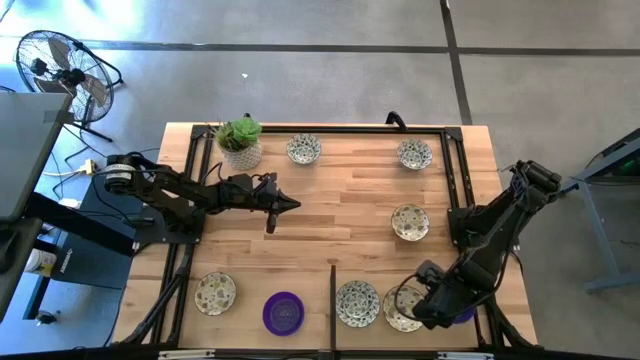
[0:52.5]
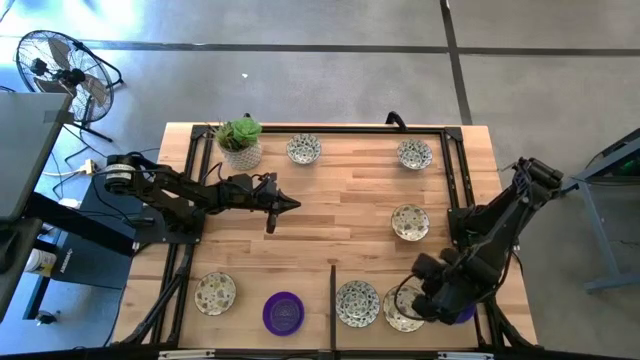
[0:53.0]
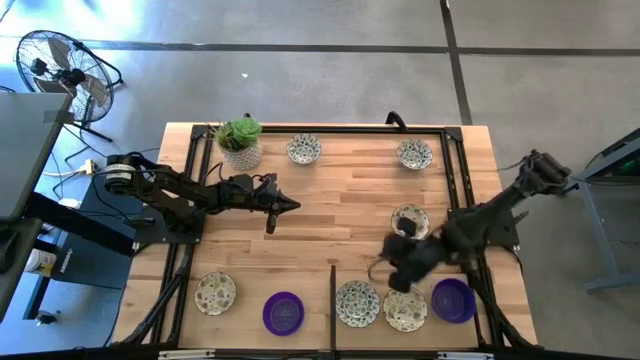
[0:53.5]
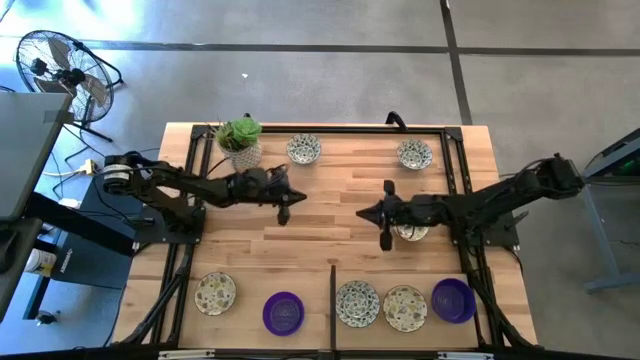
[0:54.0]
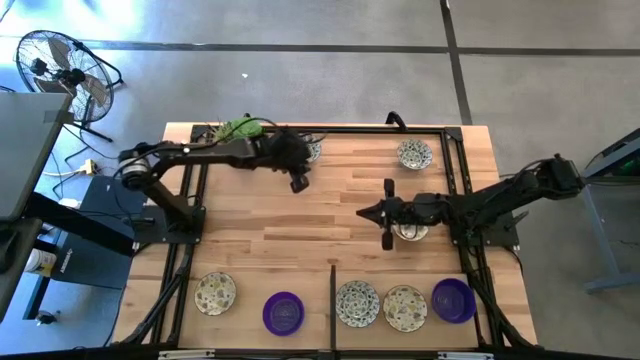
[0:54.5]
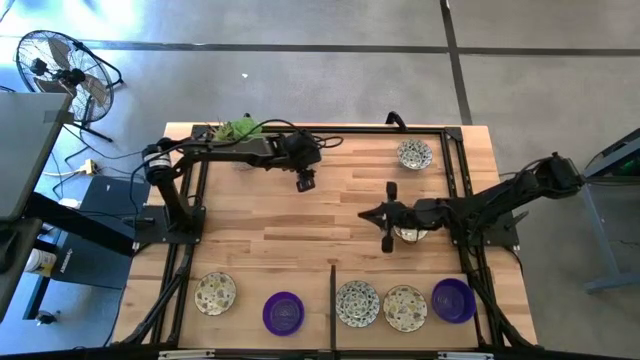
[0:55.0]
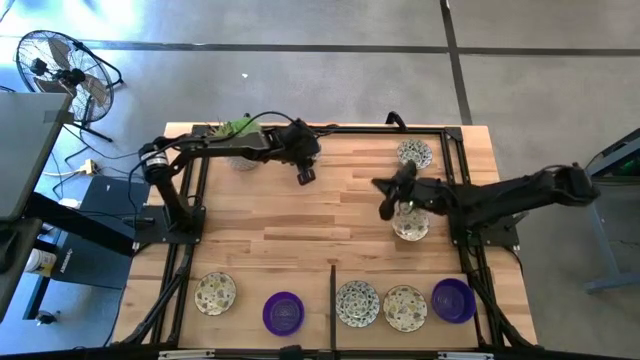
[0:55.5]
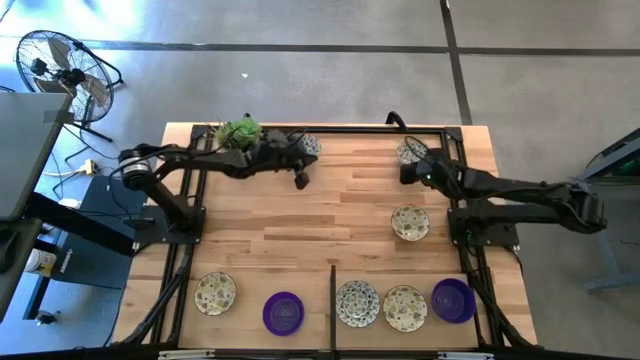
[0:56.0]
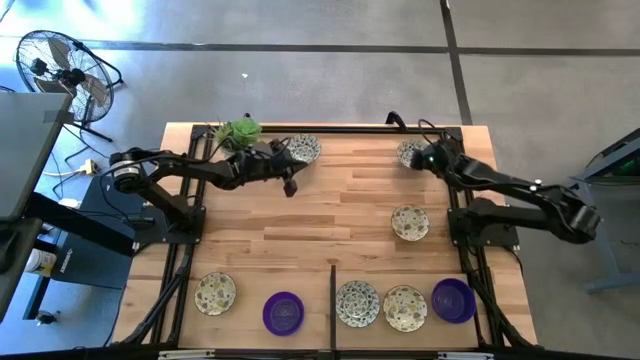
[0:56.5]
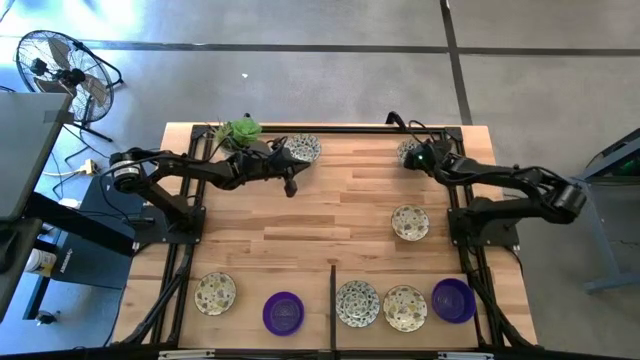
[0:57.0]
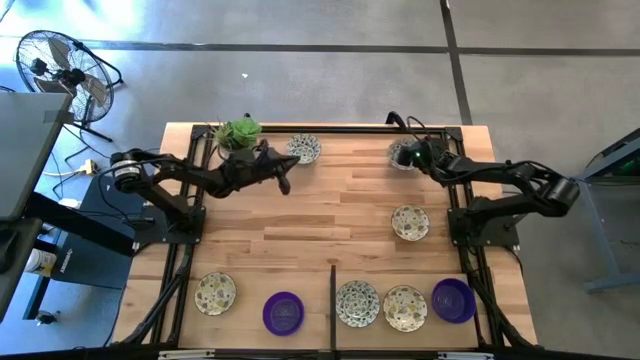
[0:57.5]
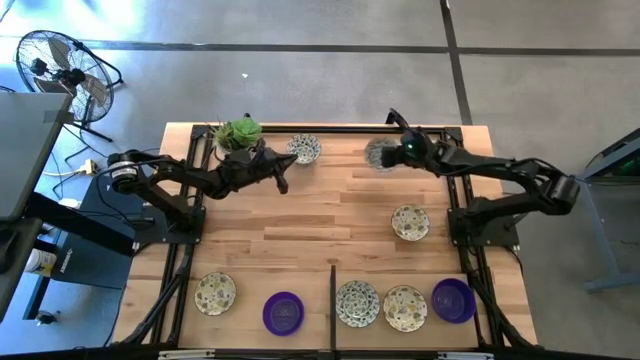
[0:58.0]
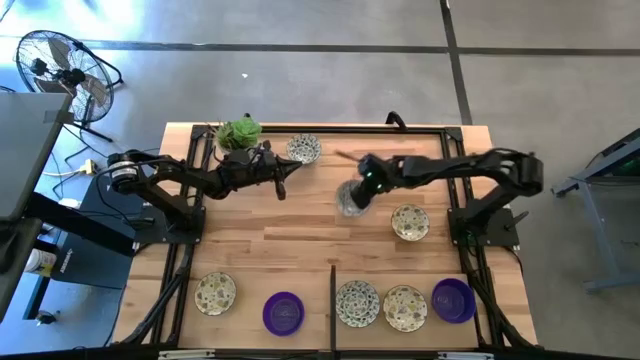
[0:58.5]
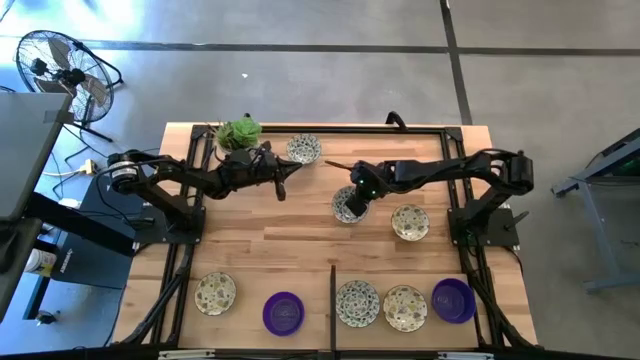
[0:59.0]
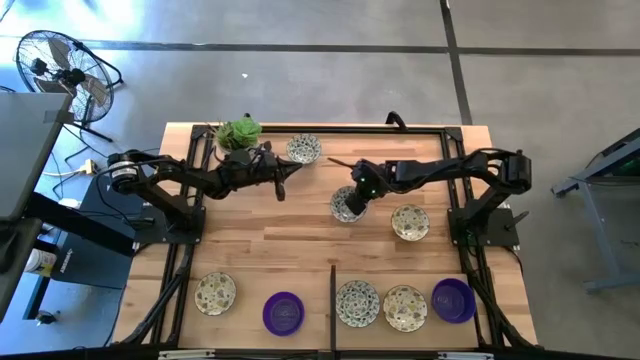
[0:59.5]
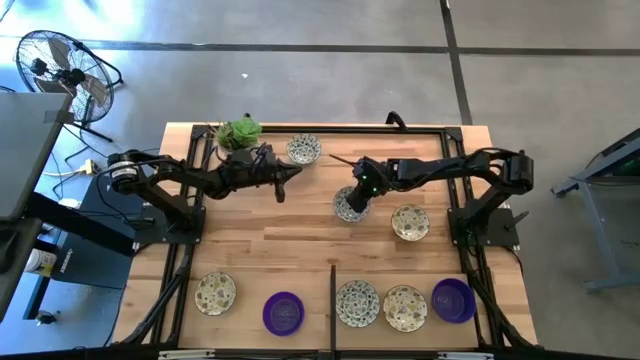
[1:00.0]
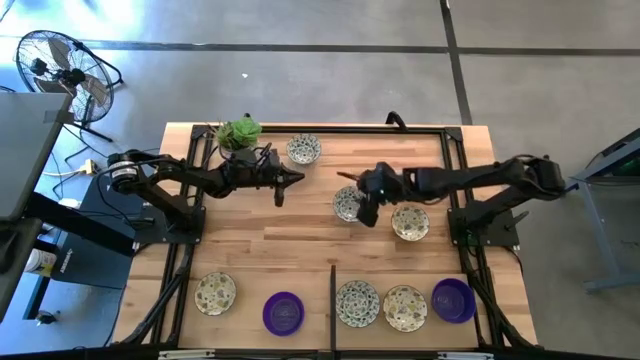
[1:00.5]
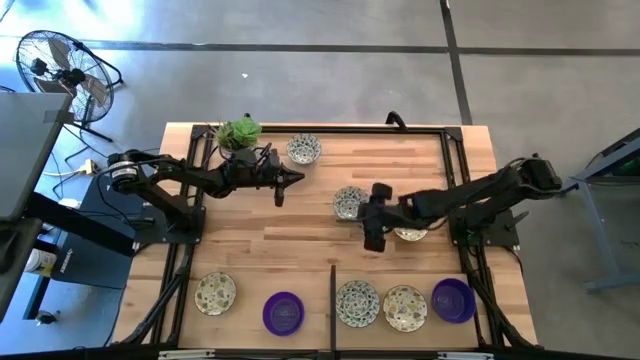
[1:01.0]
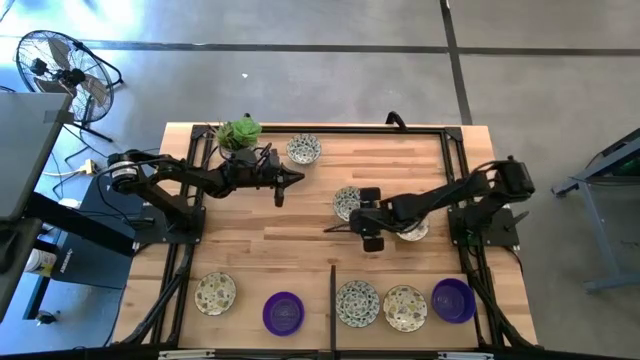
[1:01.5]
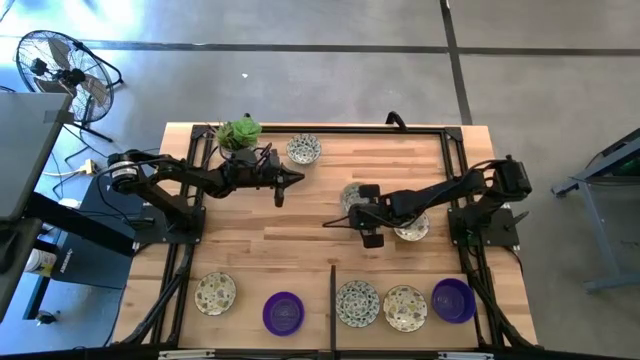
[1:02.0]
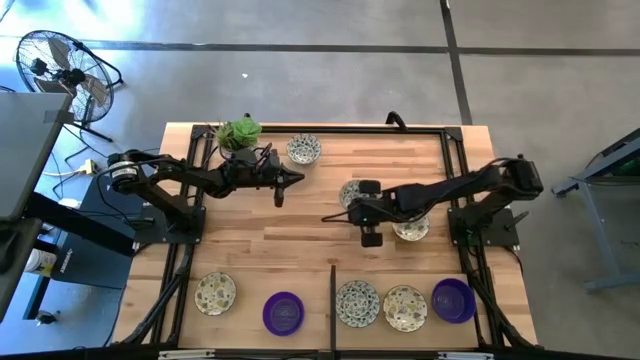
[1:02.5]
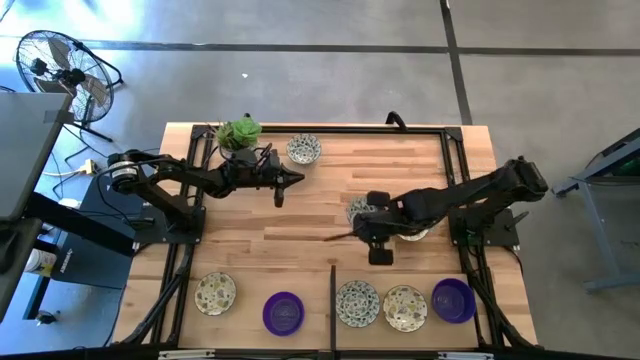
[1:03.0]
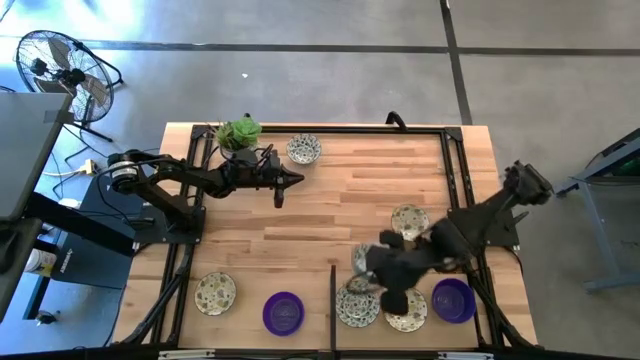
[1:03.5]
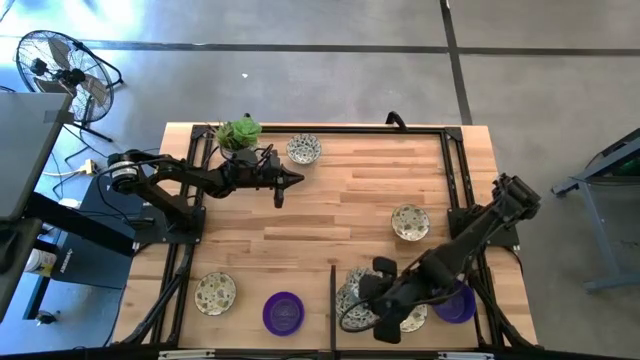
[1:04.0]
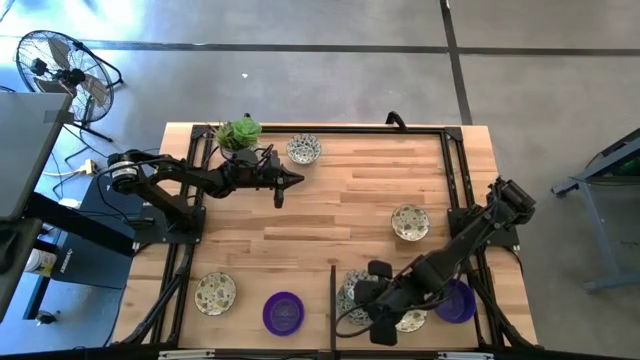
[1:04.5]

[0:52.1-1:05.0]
Task: Pick & Place Mini bowls
Stack the right blue patterned bowl on the blue patterned bowl on the shelf

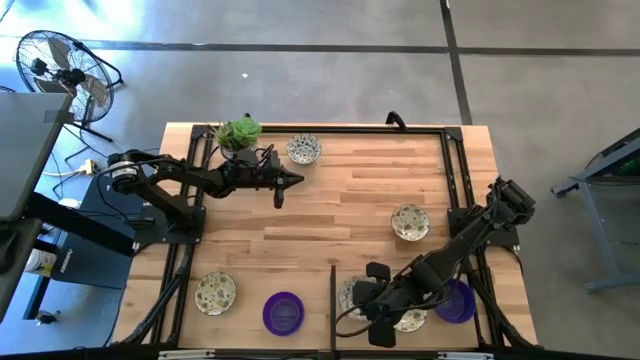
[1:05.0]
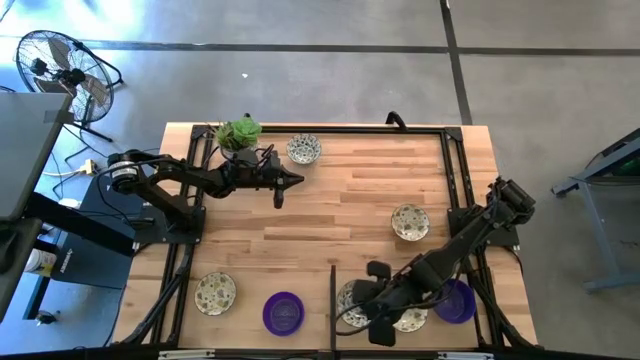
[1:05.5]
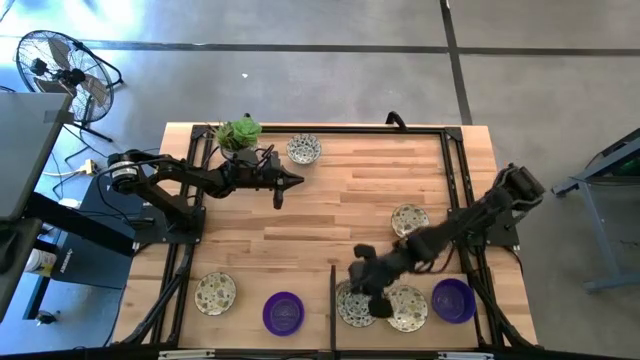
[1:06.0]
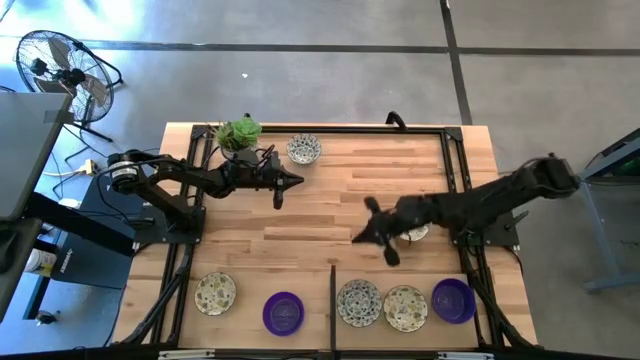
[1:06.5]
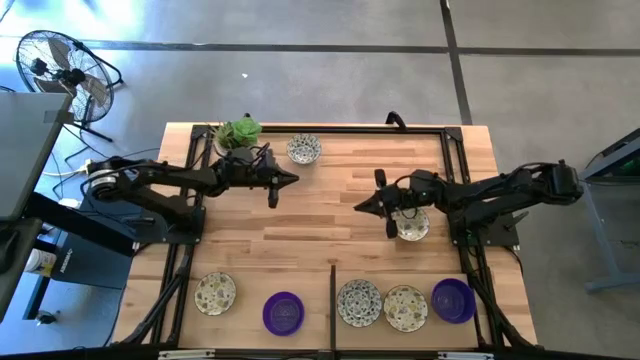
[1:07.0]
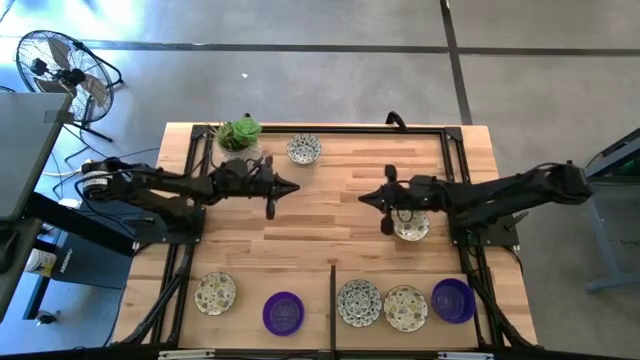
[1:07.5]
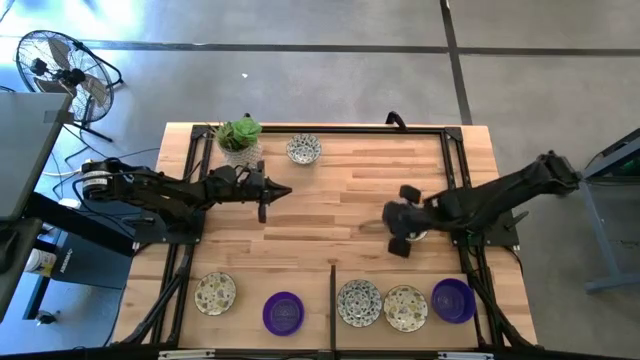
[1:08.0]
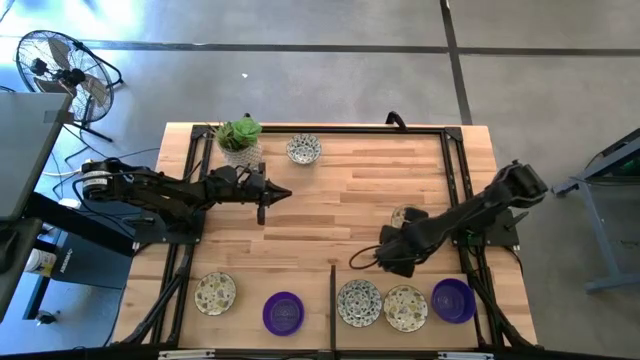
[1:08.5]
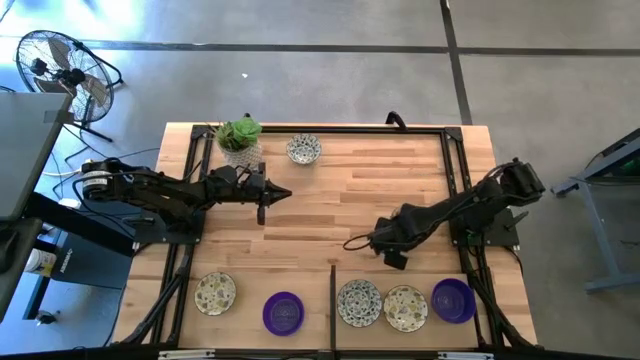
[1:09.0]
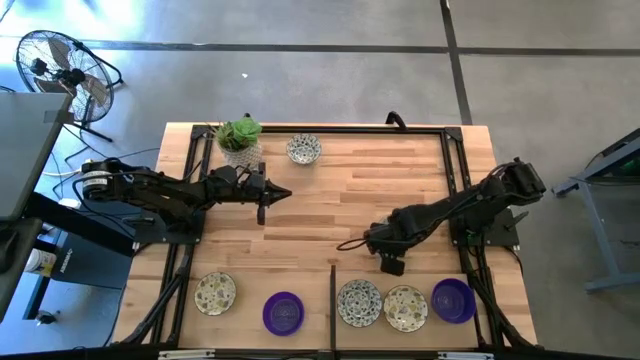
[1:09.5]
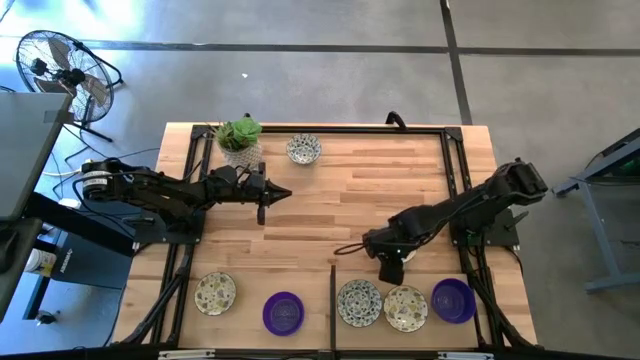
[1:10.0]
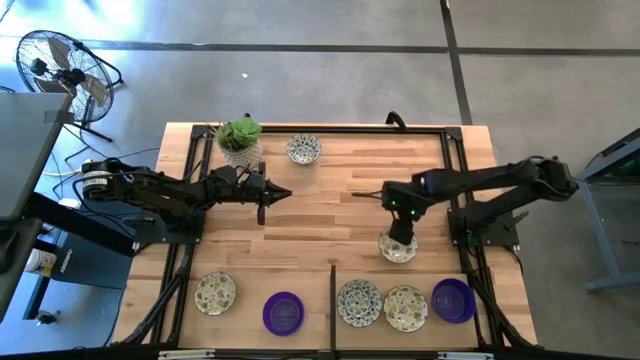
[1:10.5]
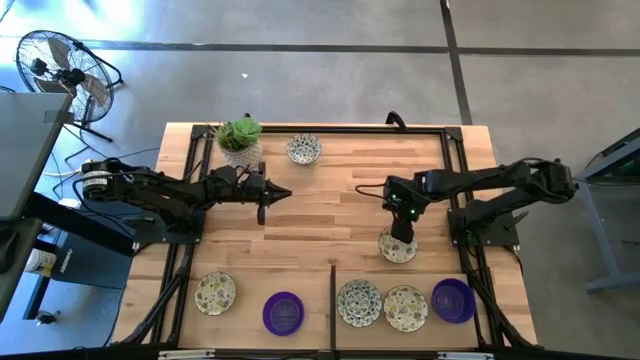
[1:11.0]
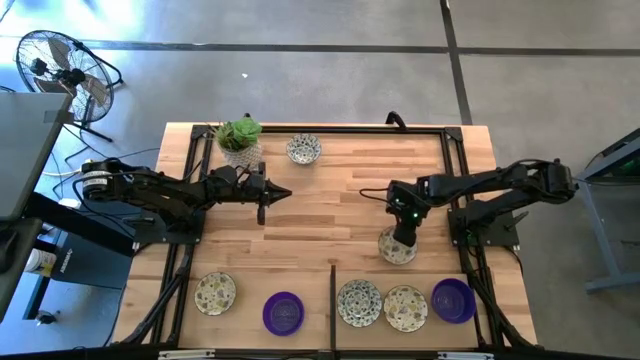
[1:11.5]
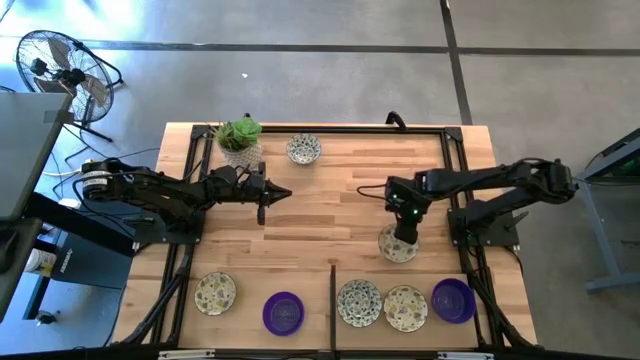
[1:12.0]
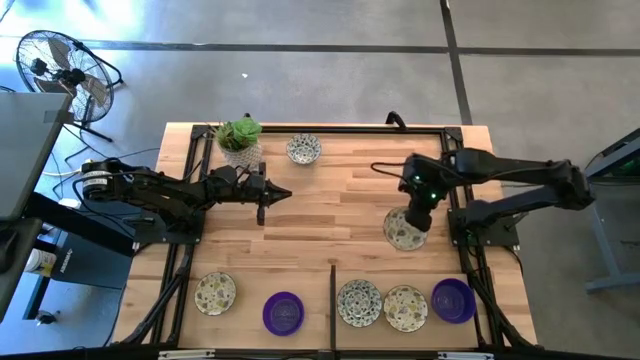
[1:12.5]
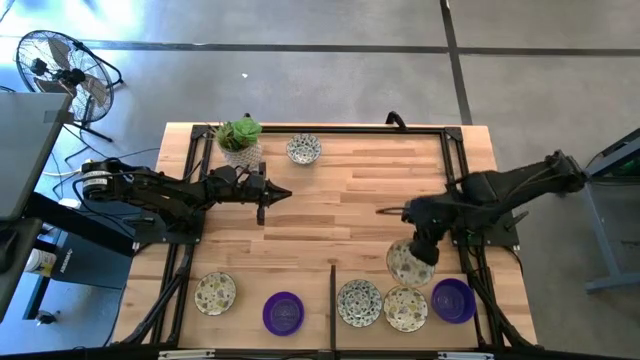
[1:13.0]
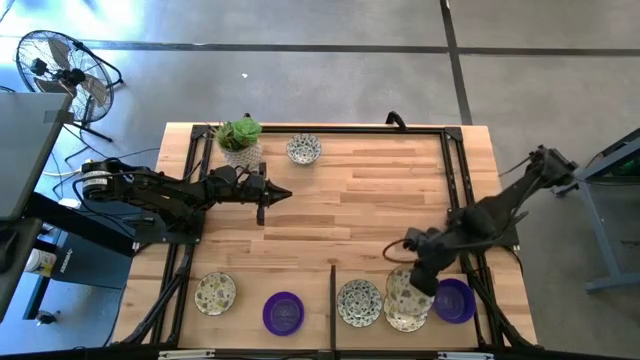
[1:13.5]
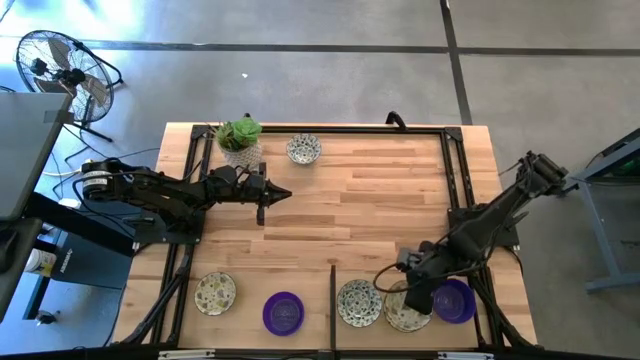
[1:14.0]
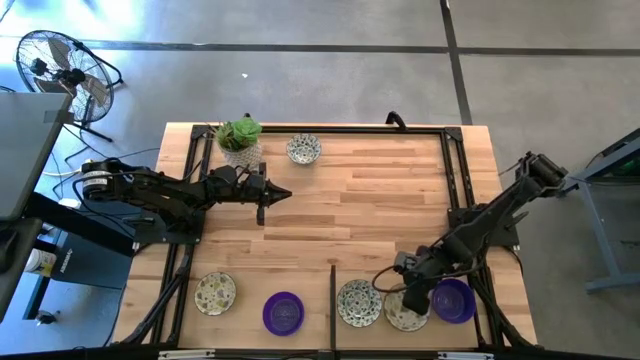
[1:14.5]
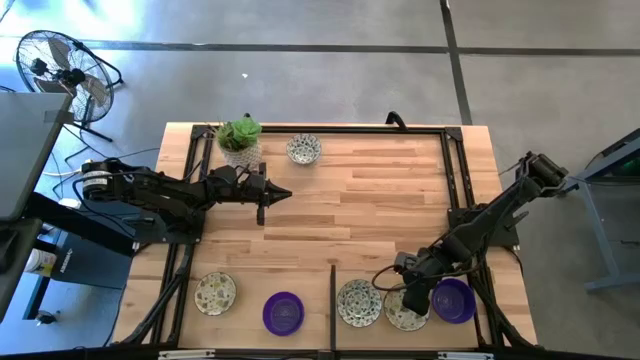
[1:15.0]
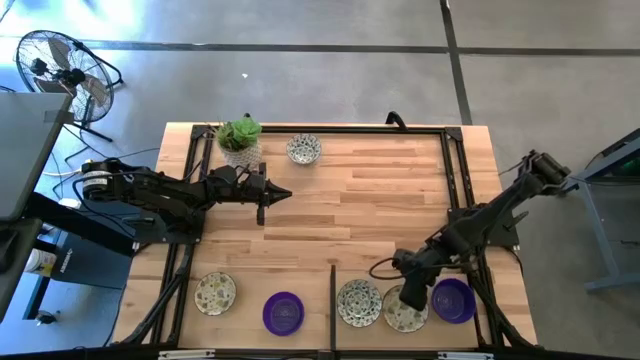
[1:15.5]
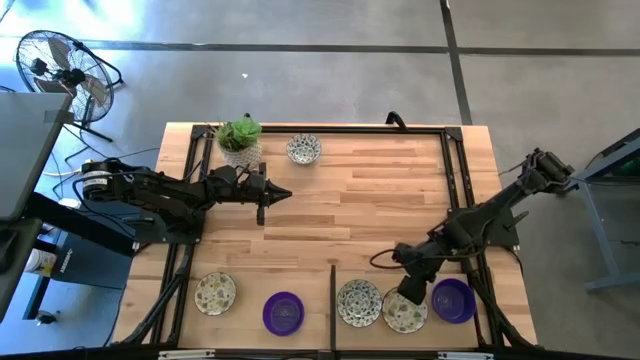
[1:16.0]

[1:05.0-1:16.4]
Stack the top yellow patterned bowl on the yellow patterned bowl on the shelf
